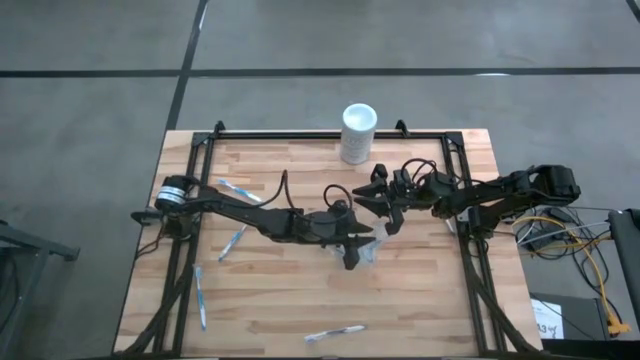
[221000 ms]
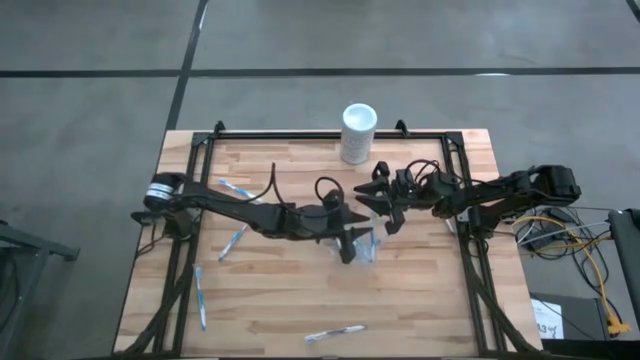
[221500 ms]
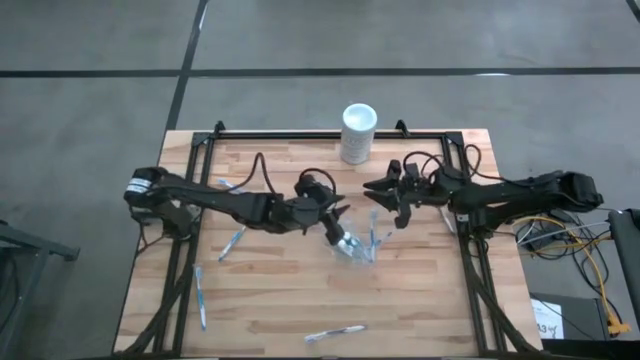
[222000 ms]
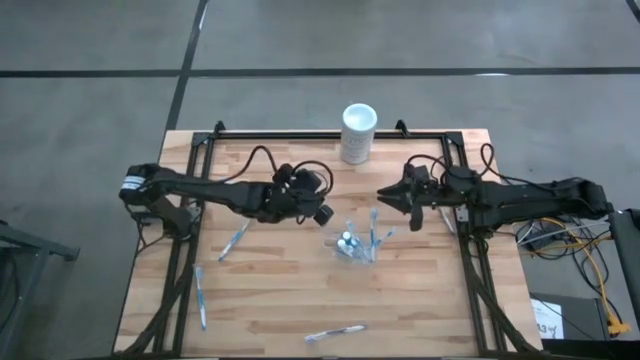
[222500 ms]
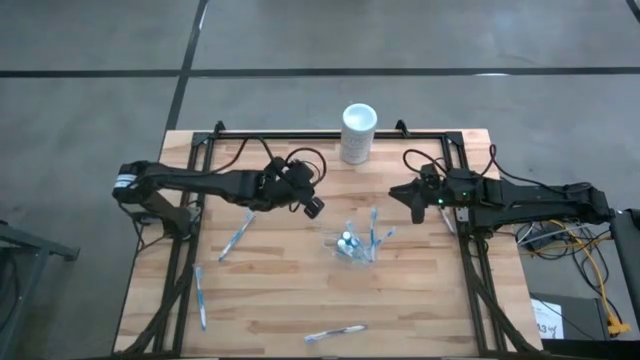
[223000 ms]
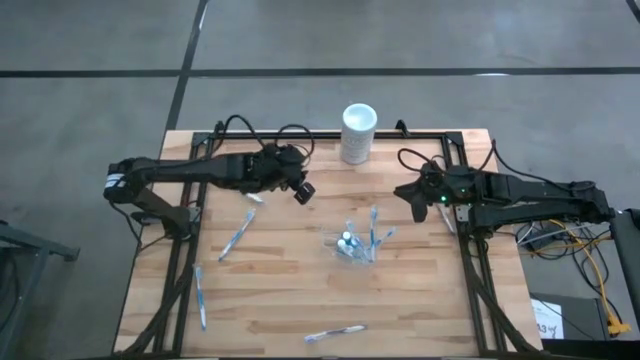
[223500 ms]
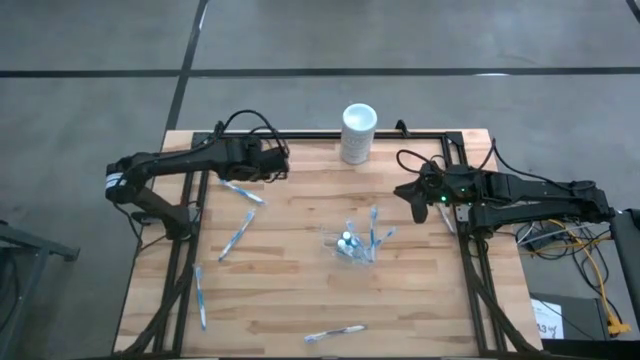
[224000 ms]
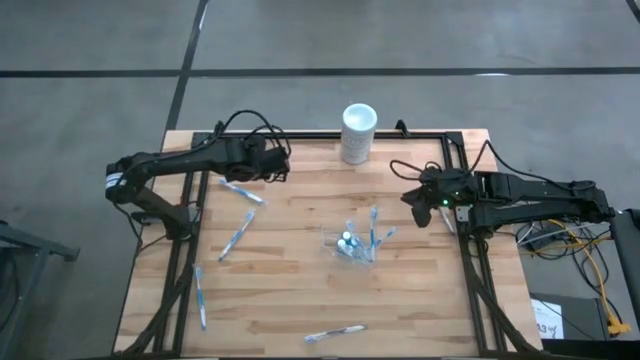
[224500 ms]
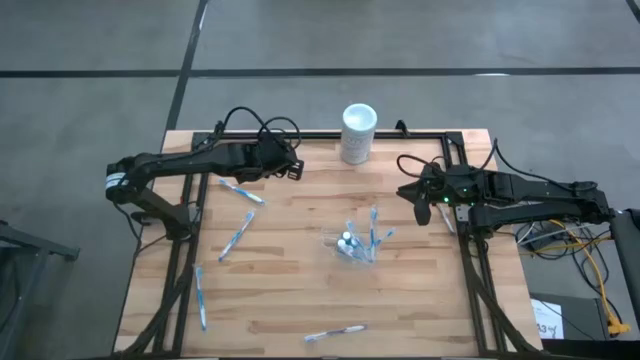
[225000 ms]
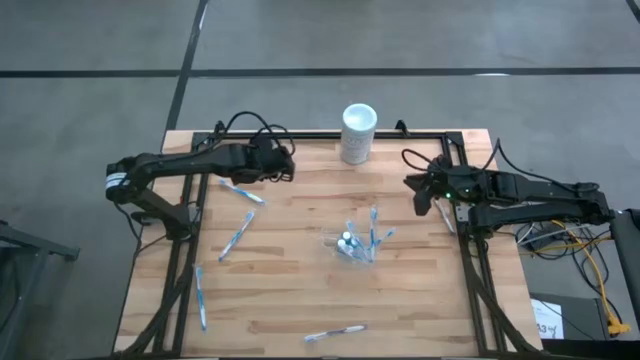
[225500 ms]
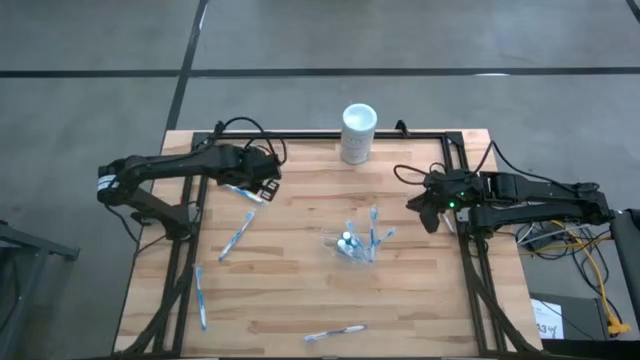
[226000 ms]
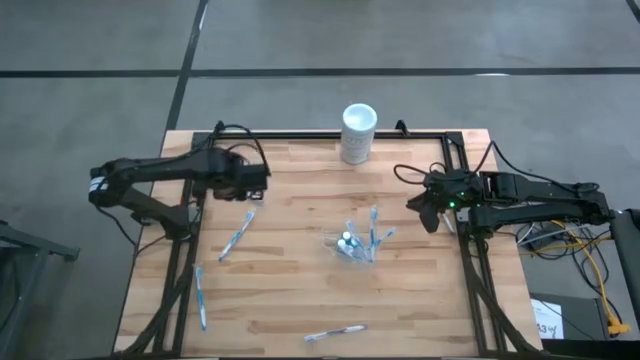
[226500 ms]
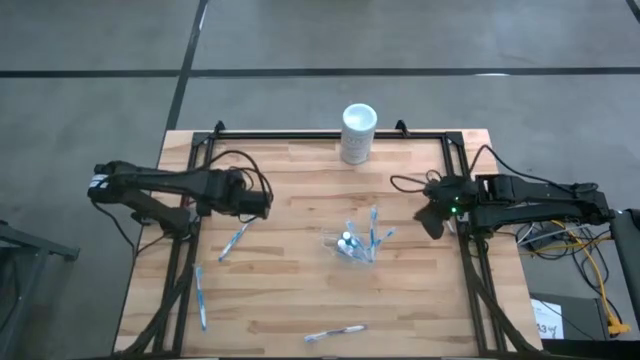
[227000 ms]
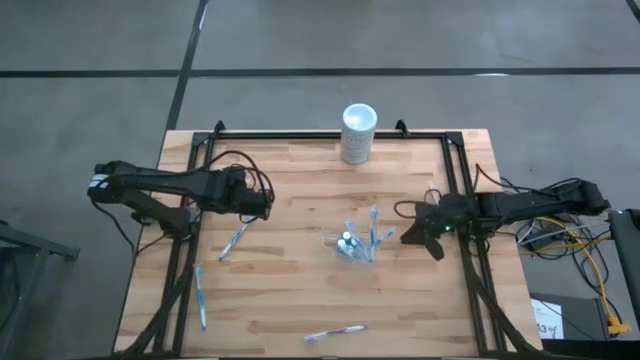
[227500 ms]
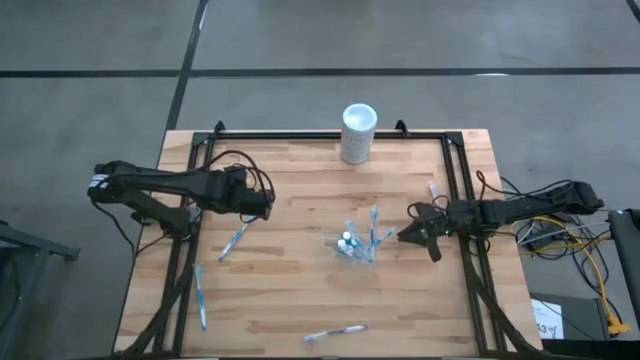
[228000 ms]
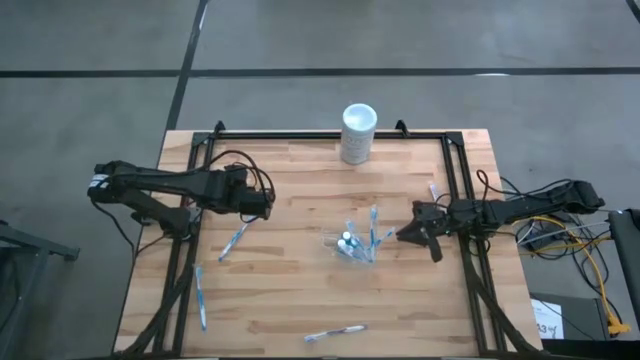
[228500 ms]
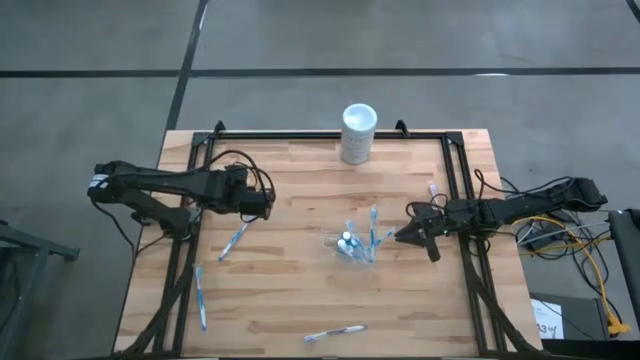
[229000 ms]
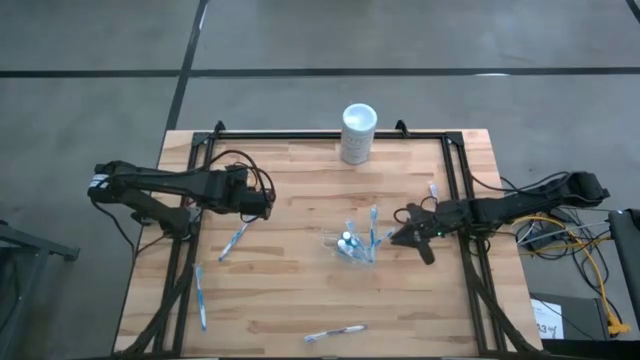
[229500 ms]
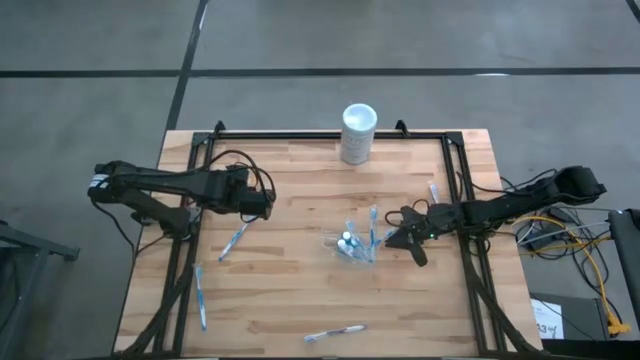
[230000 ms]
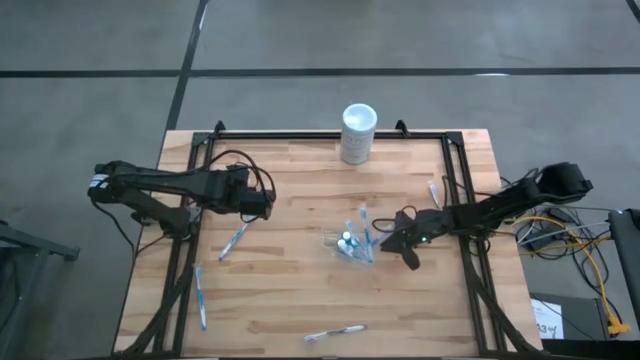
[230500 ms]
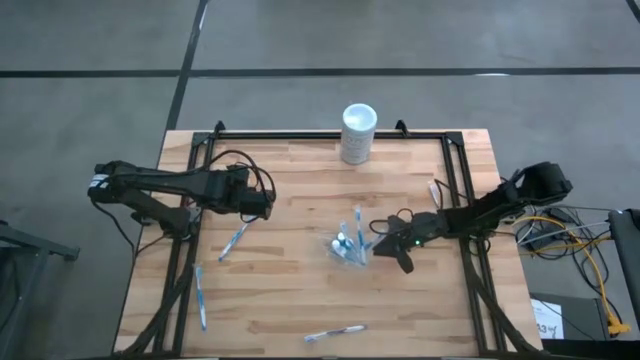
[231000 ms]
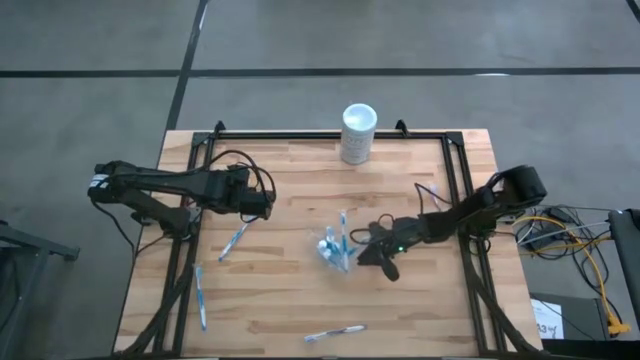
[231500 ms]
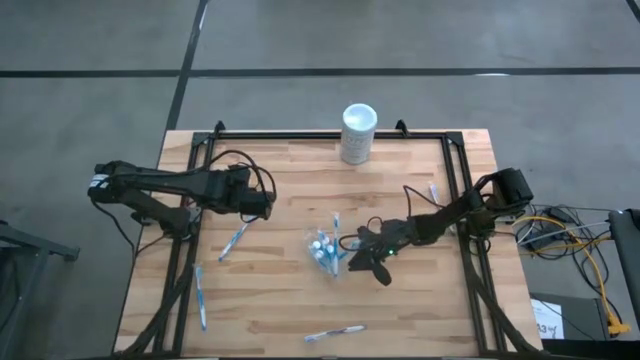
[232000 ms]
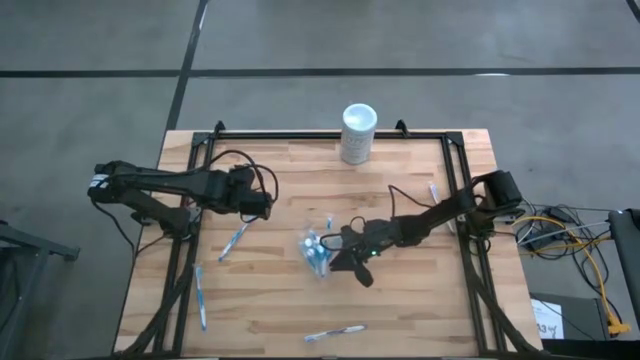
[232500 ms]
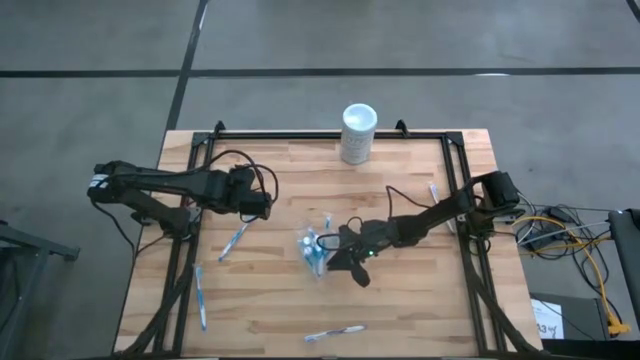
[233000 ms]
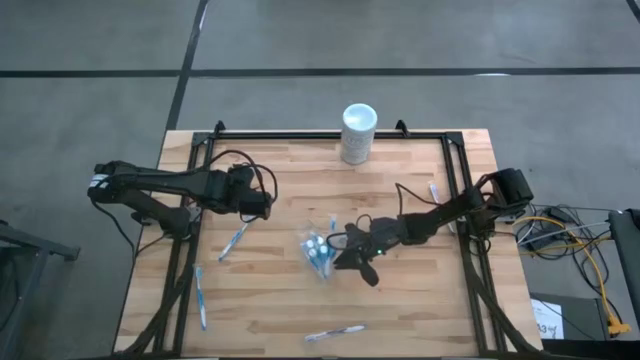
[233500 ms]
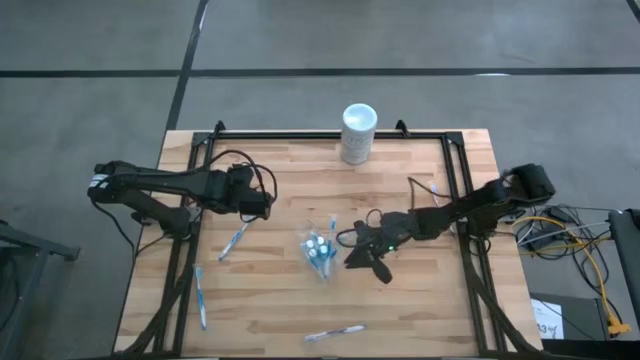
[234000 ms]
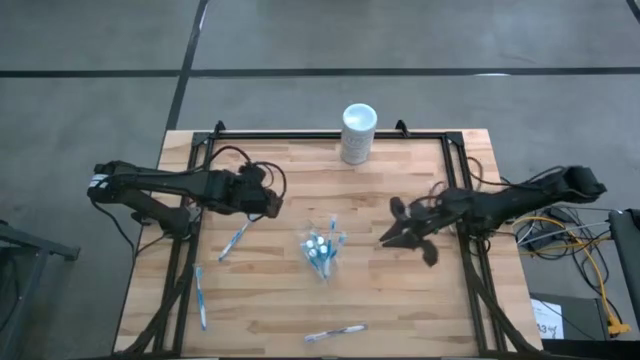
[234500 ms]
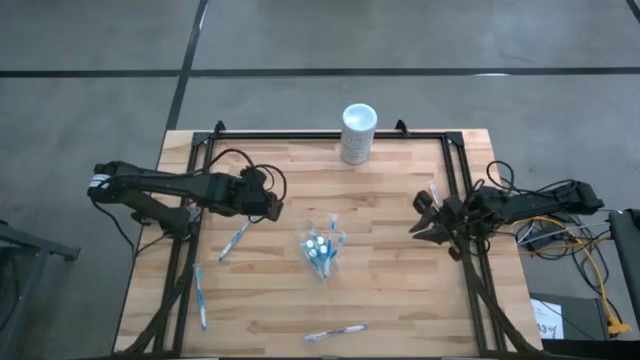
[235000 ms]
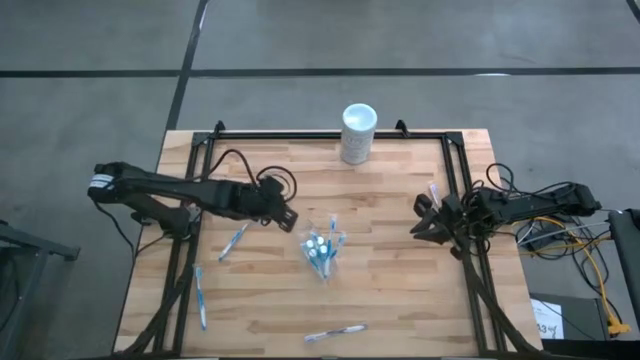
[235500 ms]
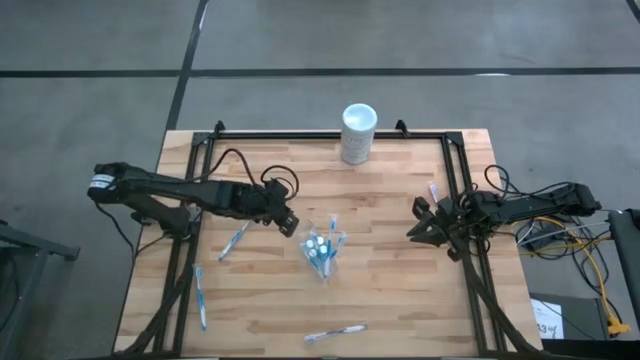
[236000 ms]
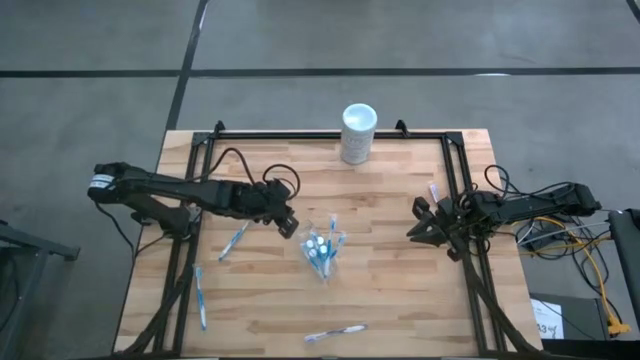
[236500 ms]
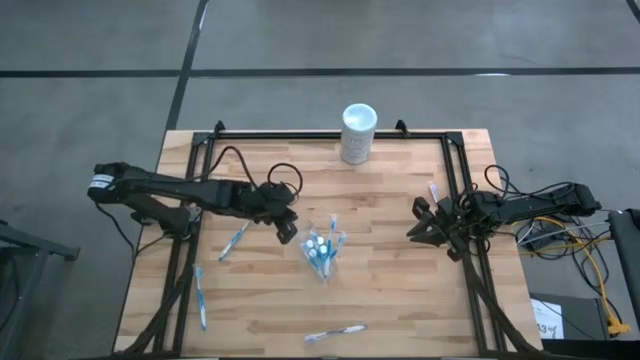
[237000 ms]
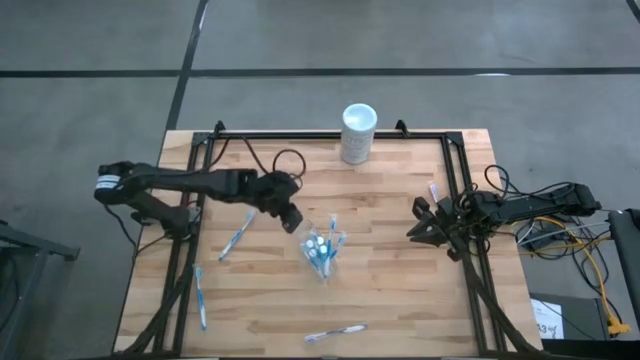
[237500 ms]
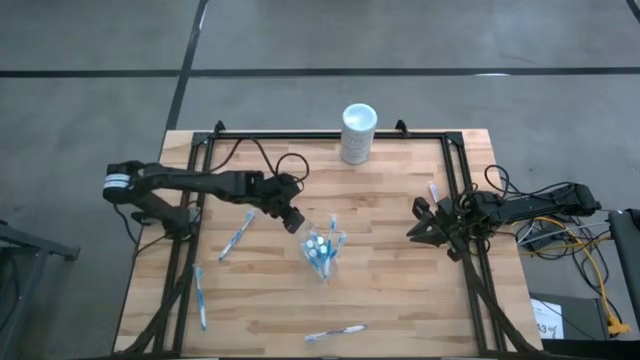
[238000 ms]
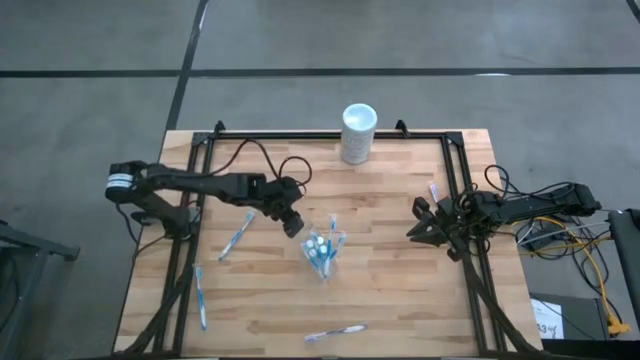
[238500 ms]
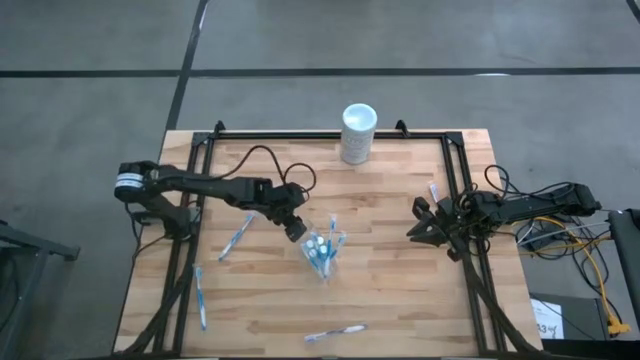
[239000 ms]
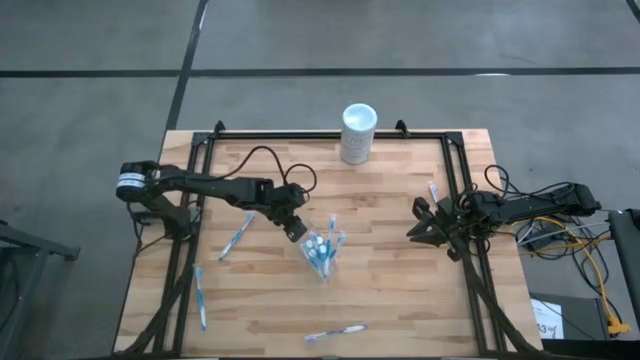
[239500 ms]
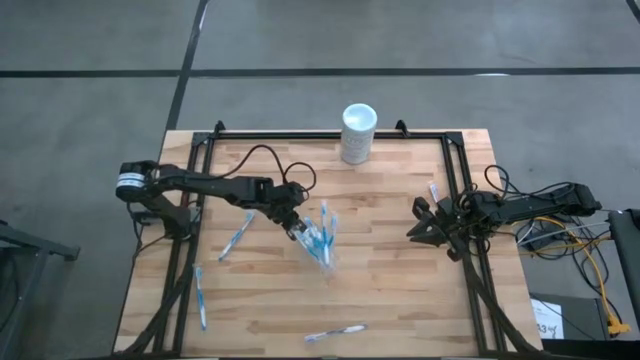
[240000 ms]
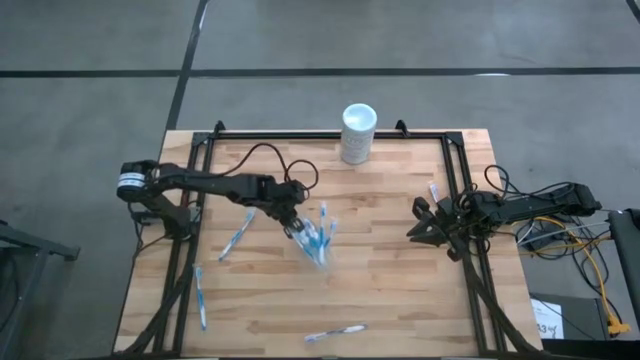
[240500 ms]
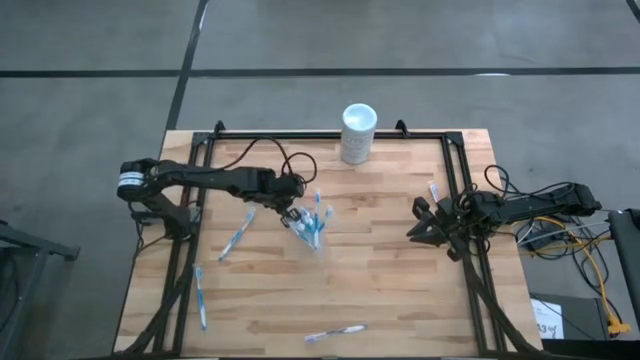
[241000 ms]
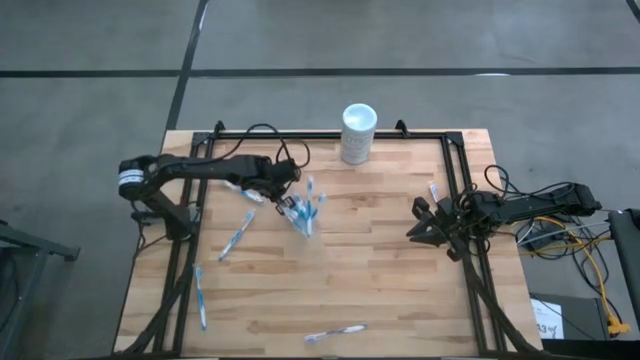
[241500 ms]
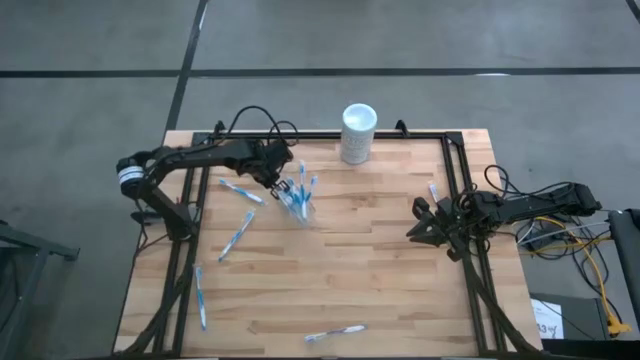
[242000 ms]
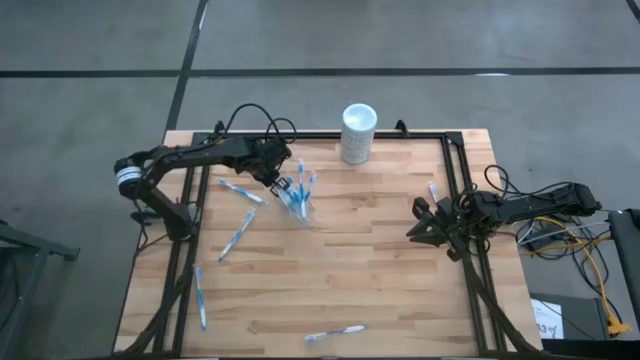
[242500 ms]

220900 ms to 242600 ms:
Task: Pick & Place toothbrushing station
Move the transparent organizer to the top left of the table
